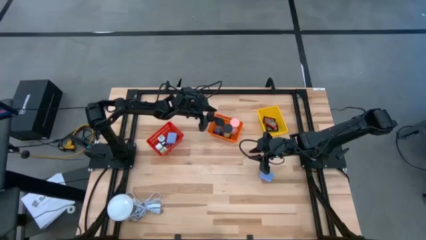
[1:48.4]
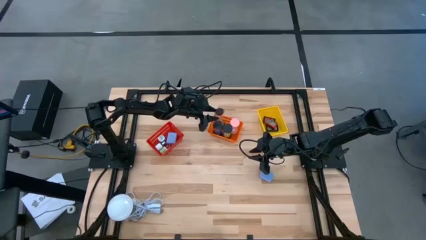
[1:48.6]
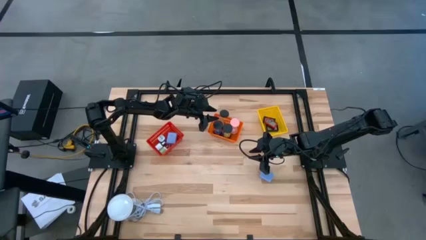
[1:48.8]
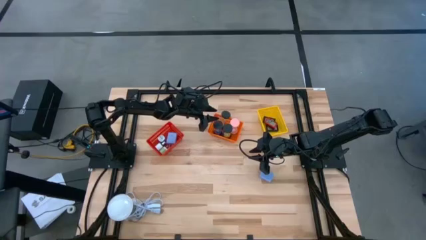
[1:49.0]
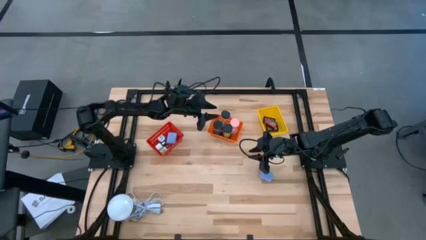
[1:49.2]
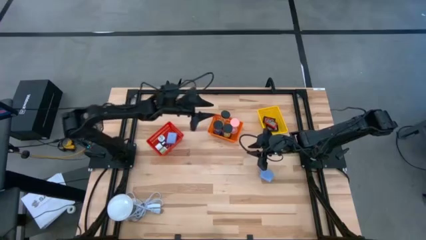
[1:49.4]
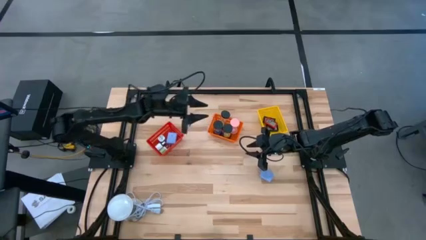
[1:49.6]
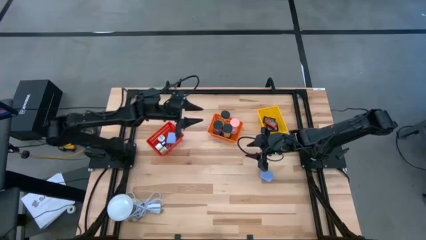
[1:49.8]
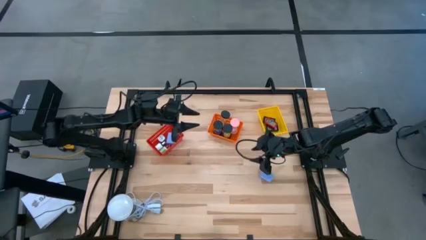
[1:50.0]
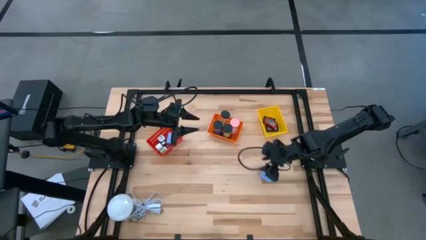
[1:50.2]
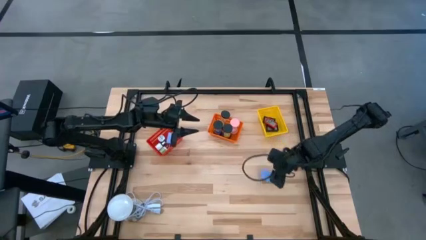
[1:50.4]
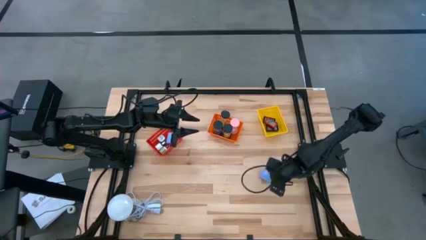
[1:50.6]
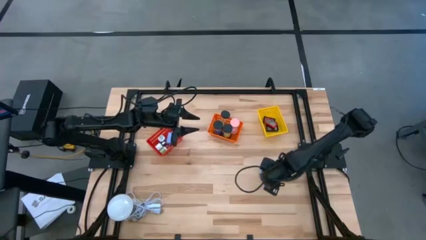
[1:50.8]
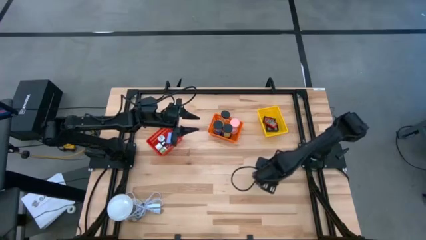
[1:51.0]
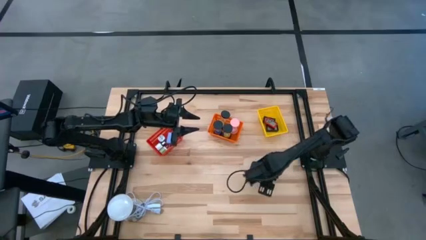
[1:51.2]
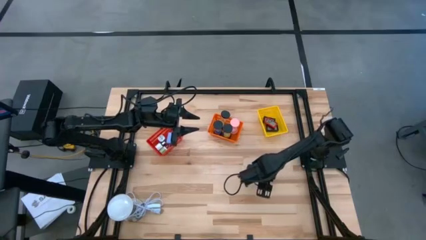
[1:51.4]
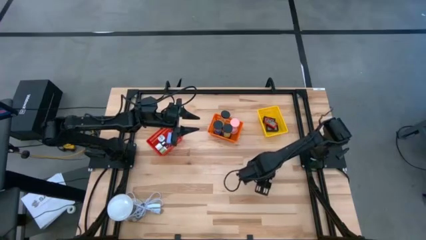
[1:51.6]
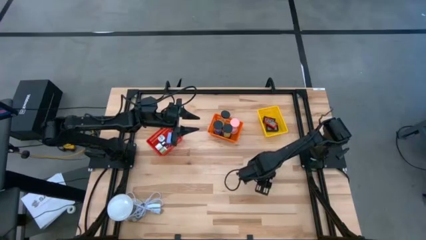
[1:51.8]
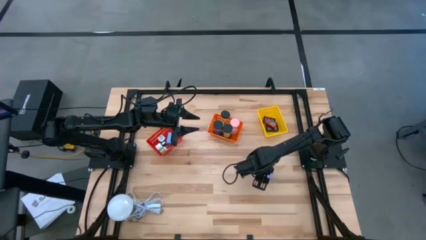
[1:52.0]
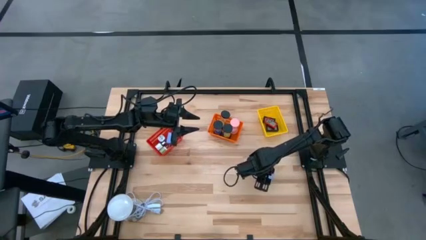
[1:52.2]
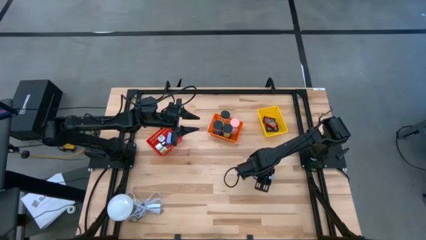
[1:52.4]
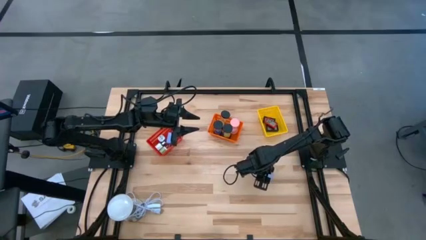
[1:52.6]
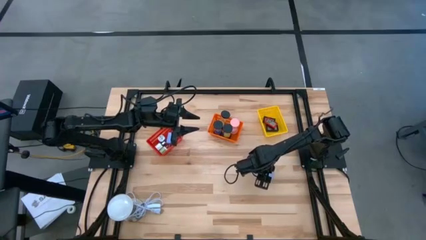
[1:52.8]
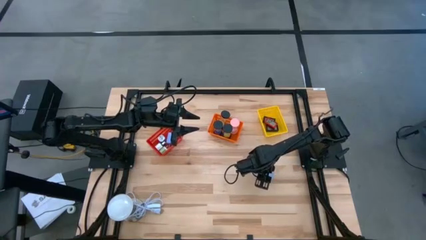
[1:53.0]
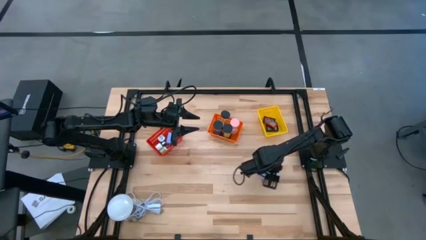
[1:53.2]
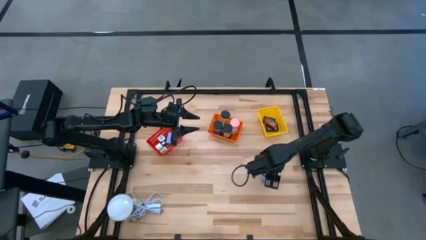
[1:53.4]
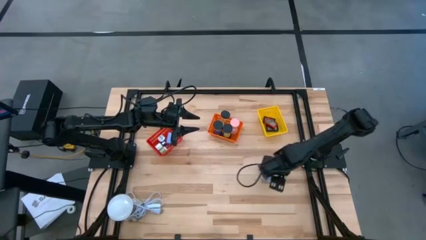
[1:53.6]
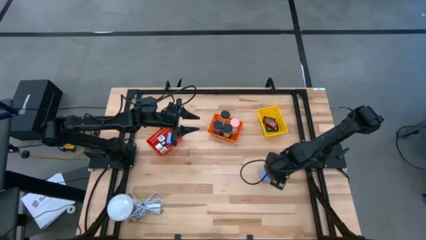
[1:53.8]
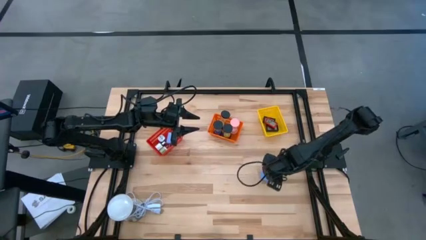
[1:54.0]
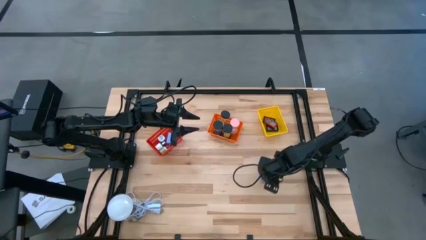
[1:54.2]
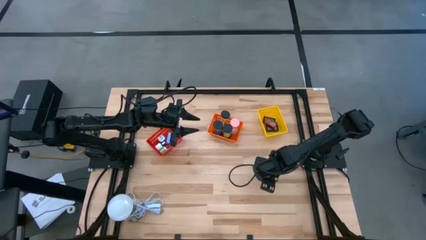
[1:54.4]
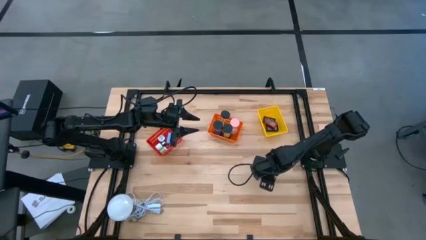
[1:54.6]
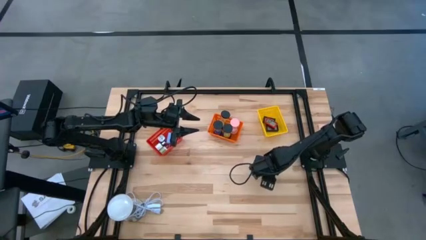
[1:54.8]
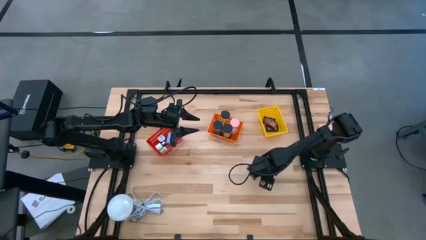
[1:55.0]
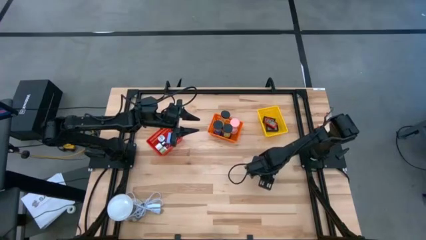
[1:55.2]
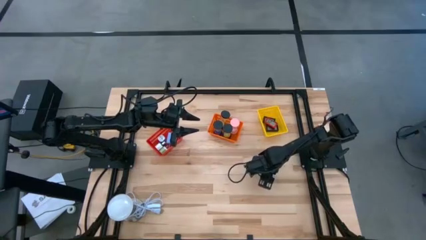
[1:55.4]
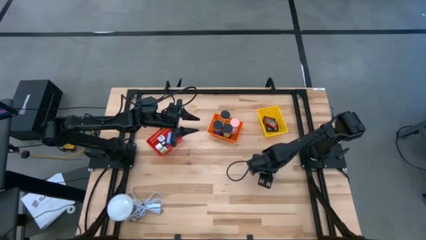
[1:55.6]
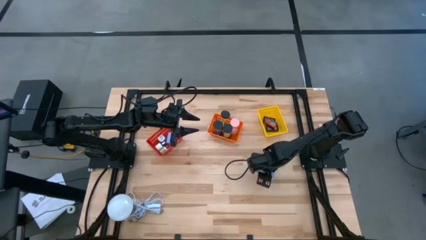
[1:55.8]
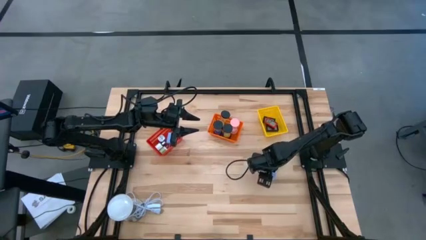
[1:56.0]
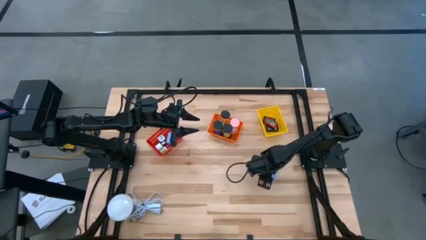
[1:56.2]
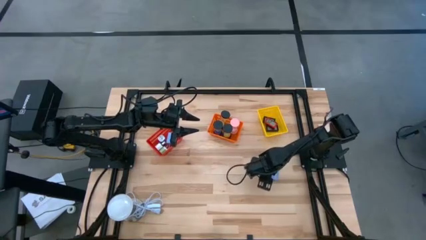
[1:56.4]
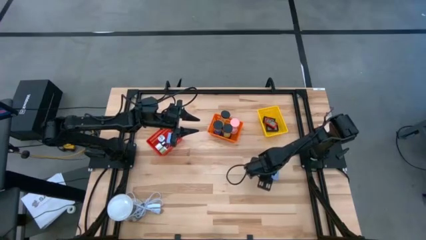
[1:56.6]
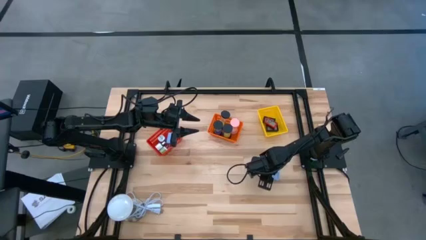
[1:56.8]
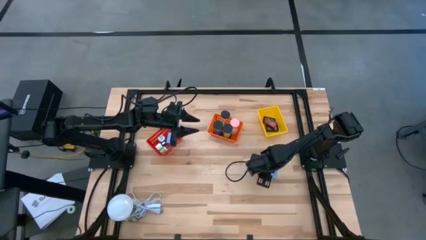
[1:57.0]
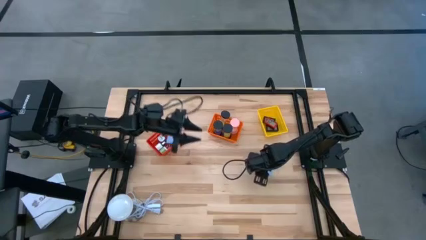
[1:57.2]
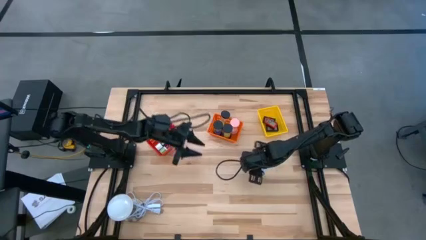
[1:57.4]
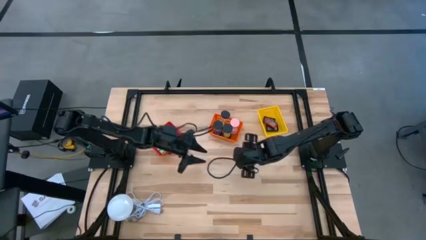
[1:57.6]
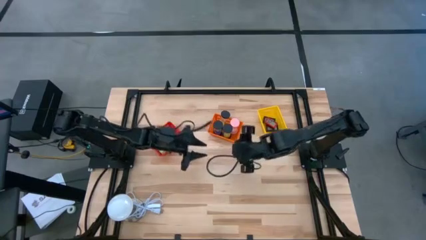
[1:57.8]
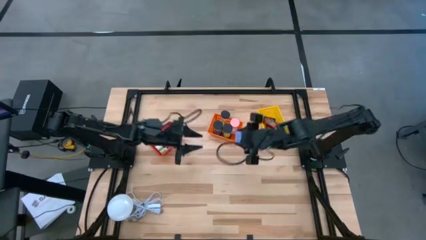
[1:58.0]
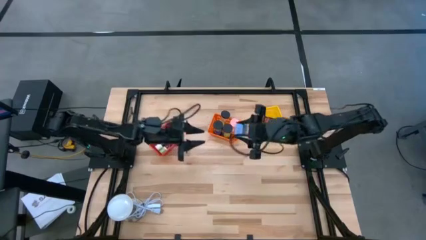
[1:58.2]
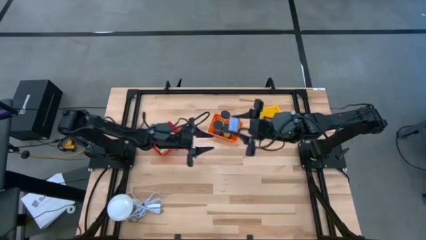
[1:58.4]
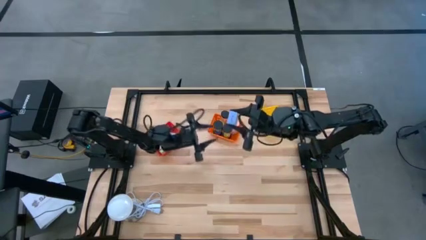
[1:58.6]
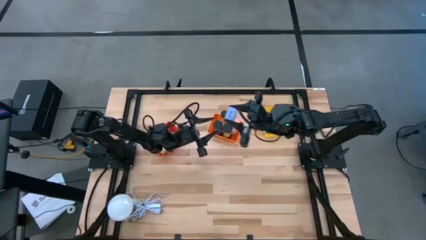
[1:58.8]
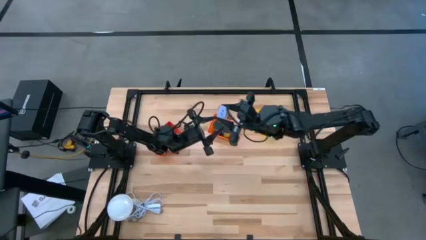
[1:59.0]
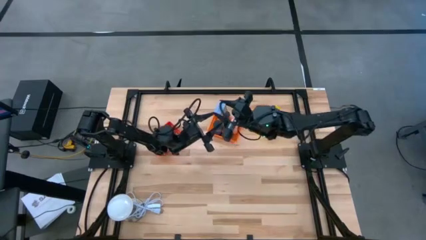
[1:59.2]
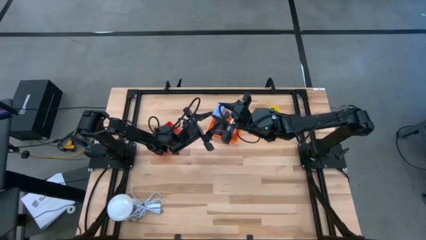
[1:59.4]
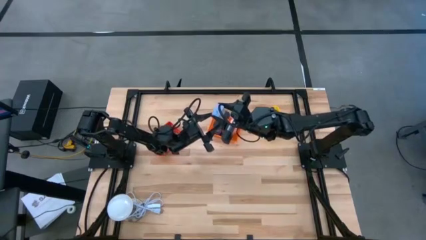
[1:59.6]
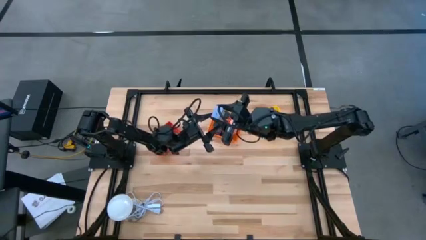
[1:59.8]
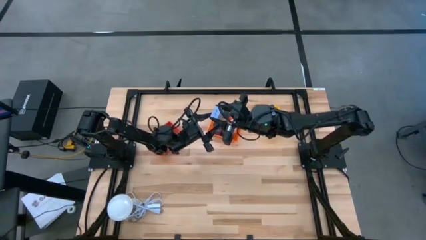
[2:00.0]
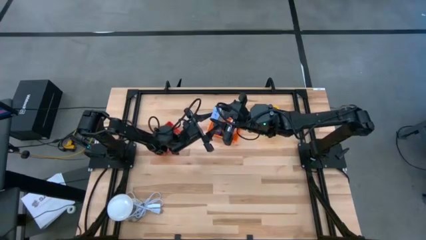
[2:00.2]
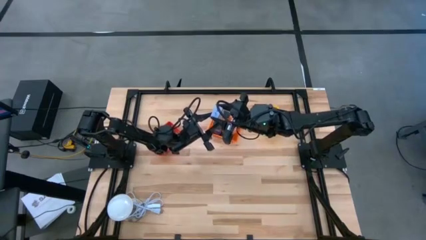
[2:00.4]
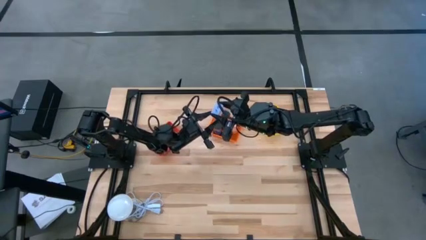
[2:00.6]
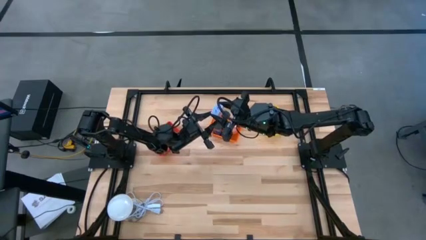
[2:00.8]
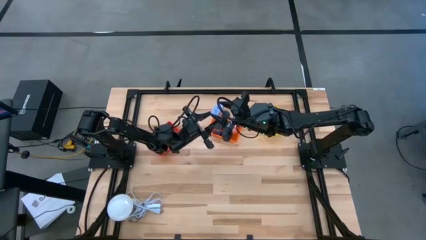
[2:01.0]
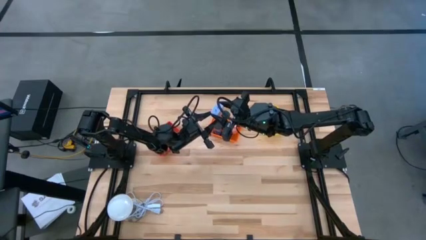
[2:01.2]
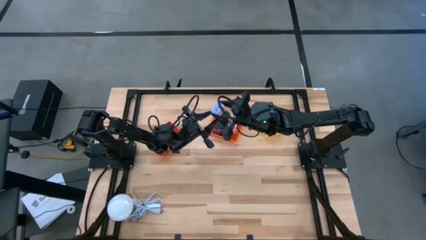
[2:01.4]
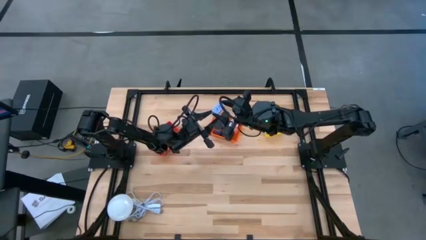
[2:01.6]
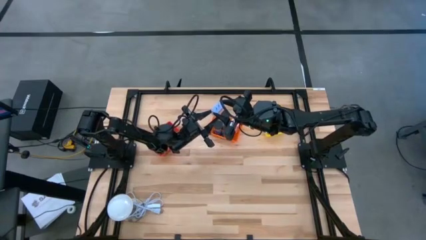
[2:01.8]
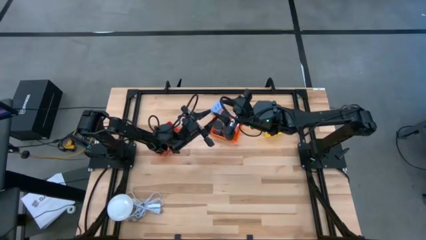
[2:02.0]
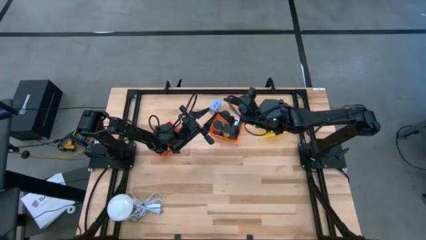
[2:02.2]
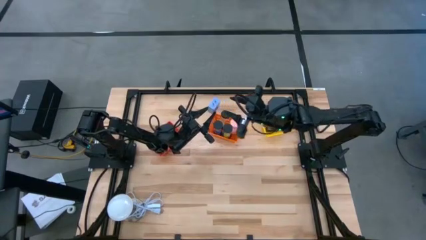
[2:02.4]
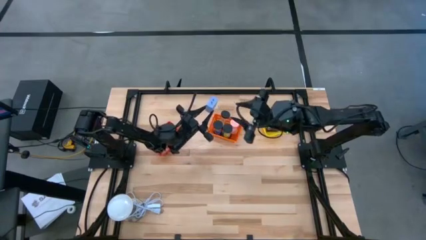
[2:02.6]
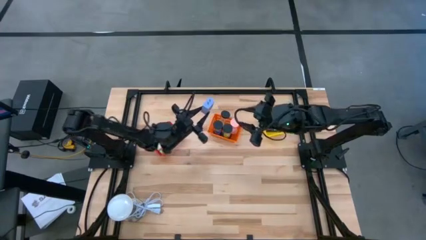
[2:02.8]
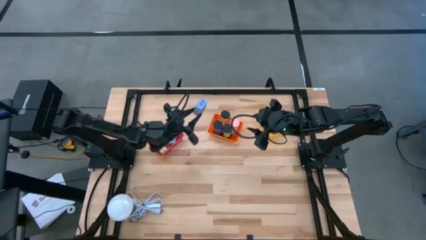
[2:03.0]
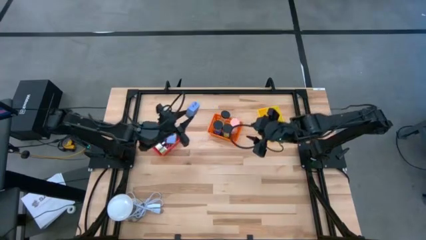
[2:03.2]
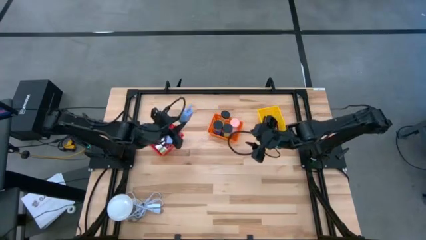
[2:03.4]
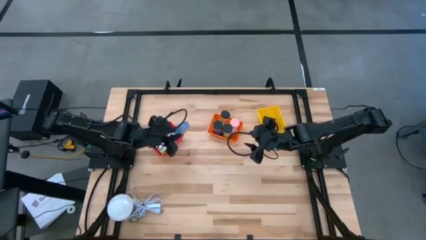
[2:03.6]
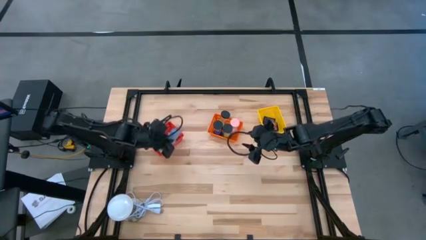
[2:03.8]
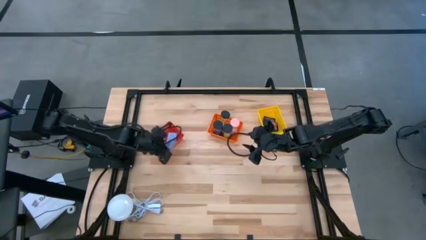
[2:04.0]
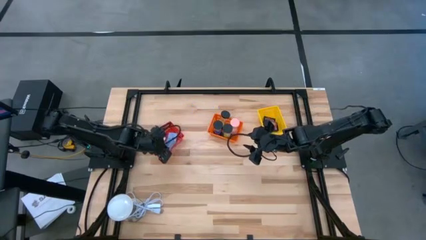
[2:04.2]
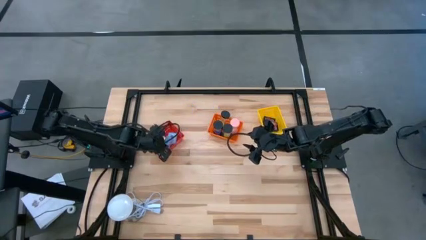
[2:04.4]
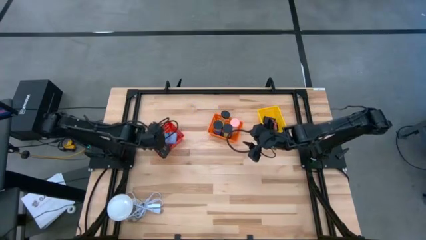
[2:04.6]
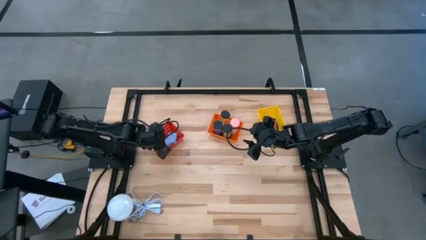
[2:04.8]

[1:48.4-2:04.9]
Task: Pick & Place Office items
Put the light blue charger adapter into the red basket
